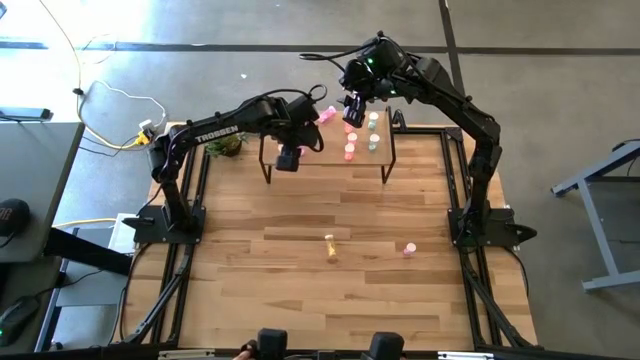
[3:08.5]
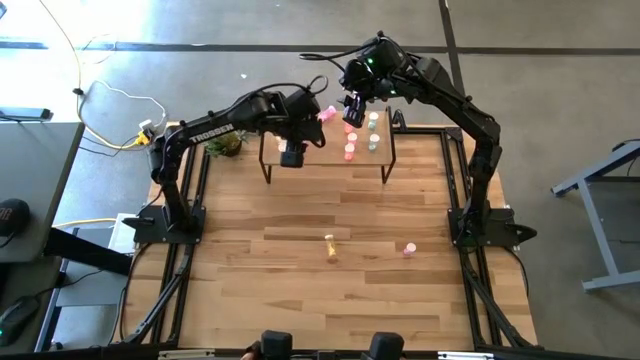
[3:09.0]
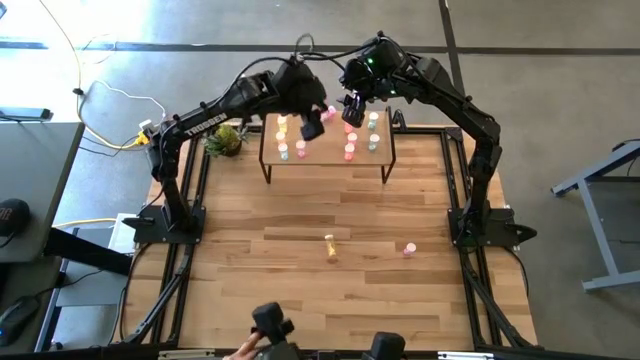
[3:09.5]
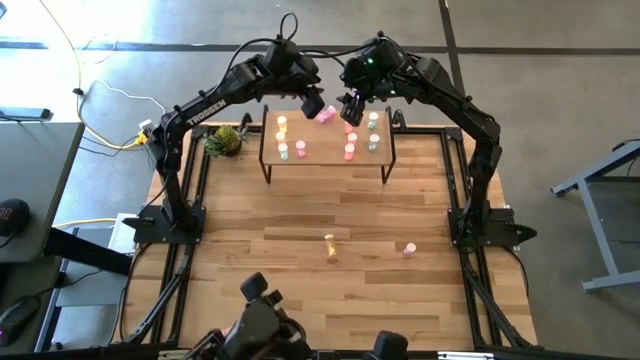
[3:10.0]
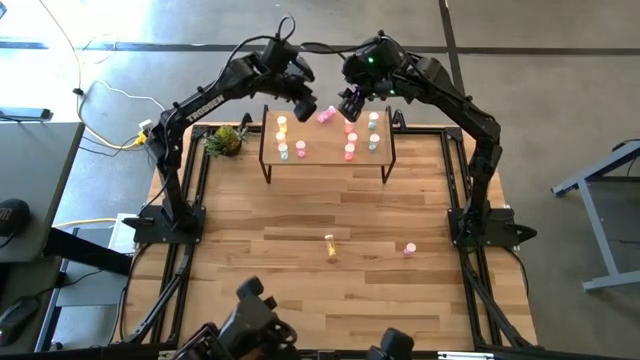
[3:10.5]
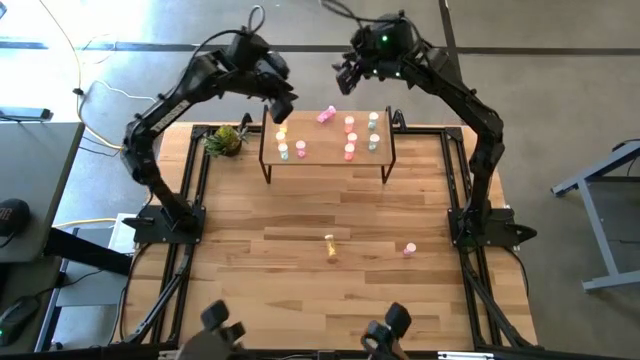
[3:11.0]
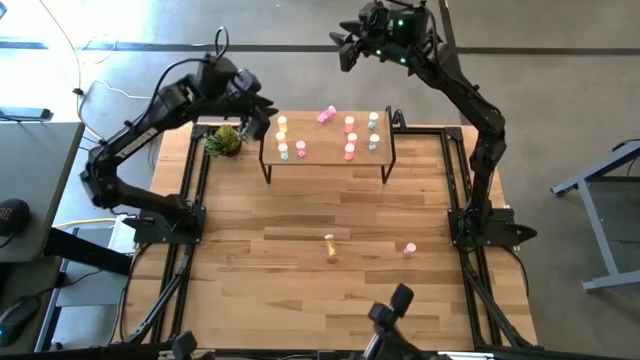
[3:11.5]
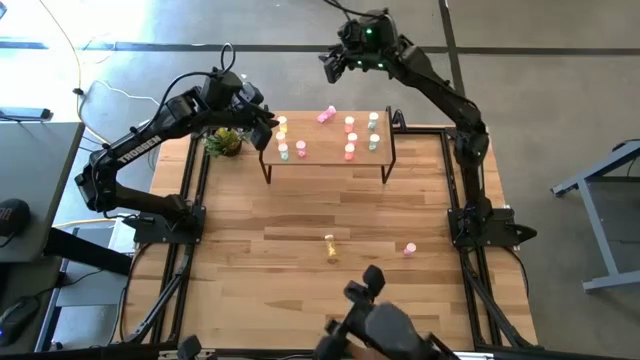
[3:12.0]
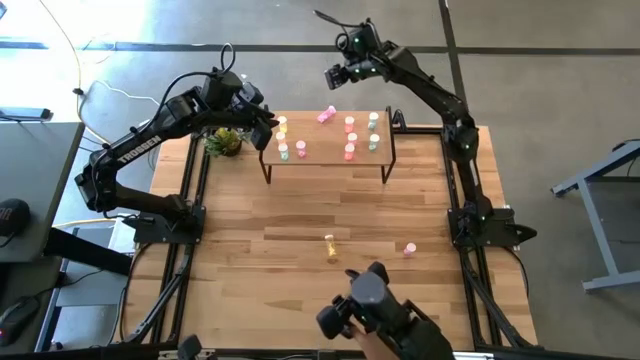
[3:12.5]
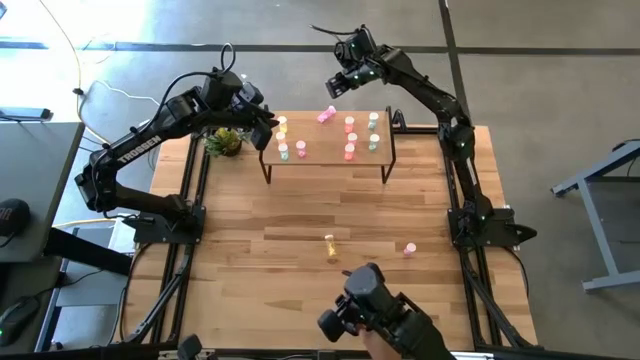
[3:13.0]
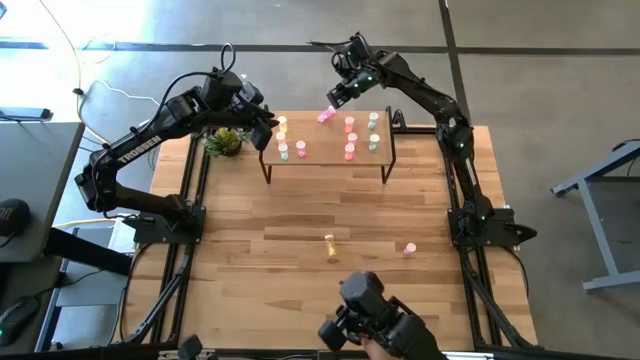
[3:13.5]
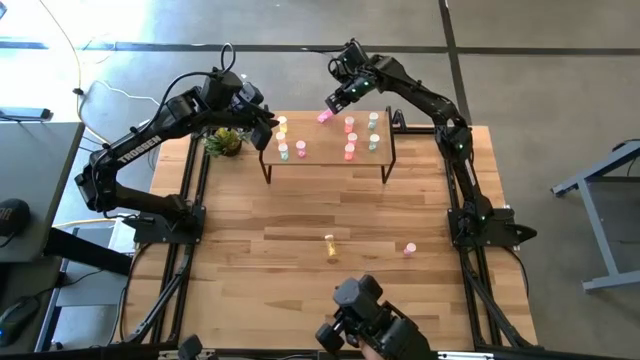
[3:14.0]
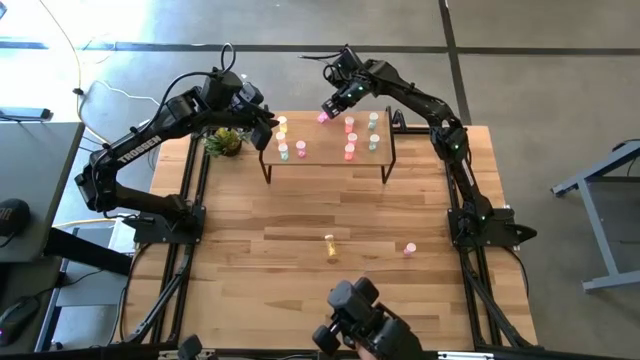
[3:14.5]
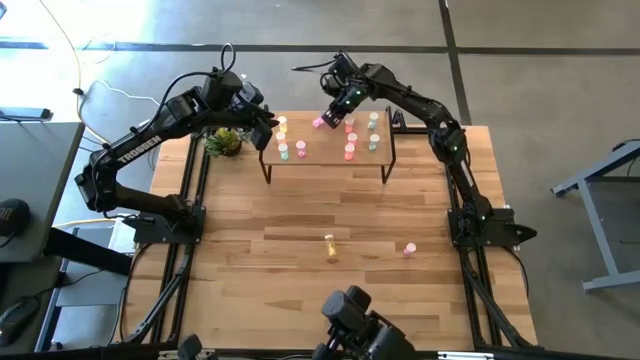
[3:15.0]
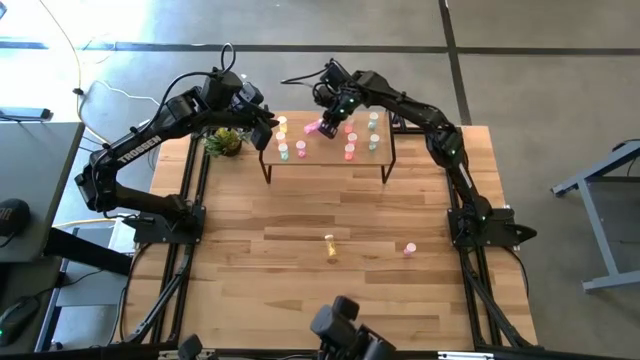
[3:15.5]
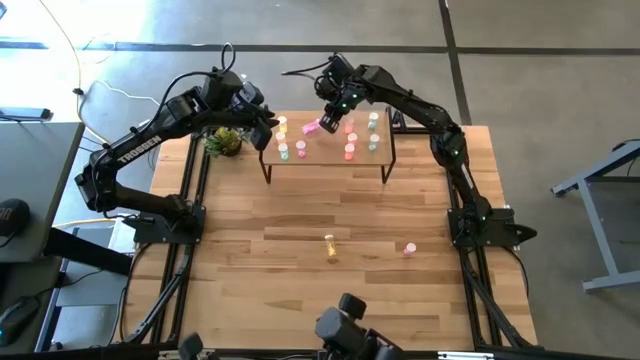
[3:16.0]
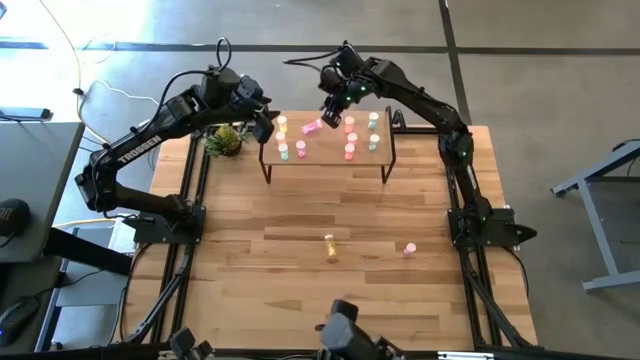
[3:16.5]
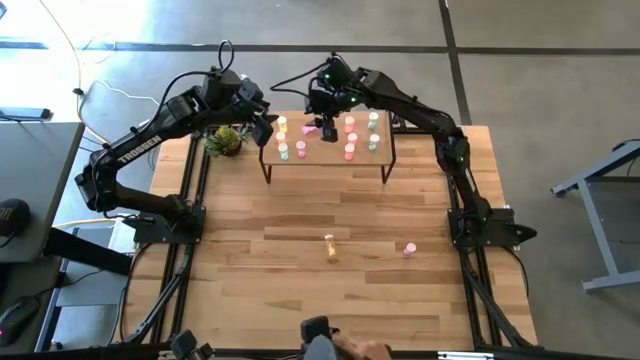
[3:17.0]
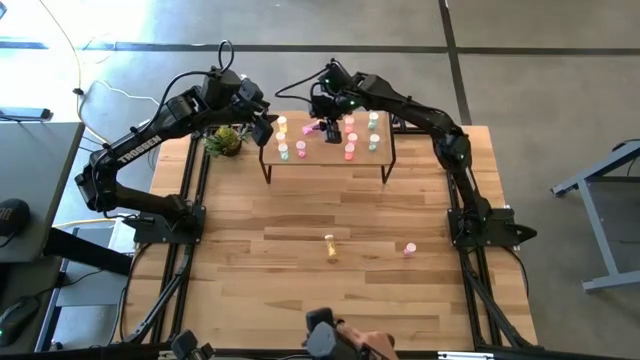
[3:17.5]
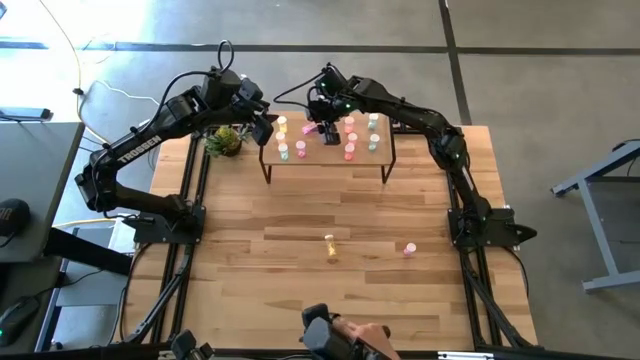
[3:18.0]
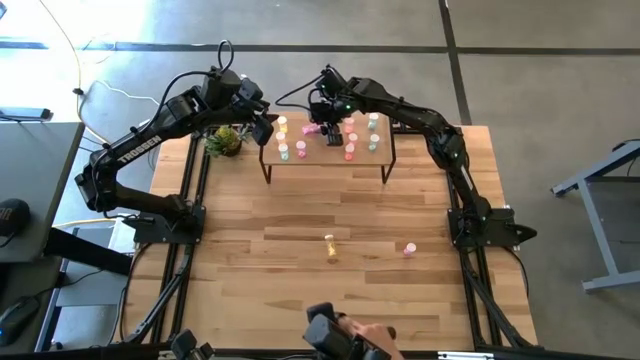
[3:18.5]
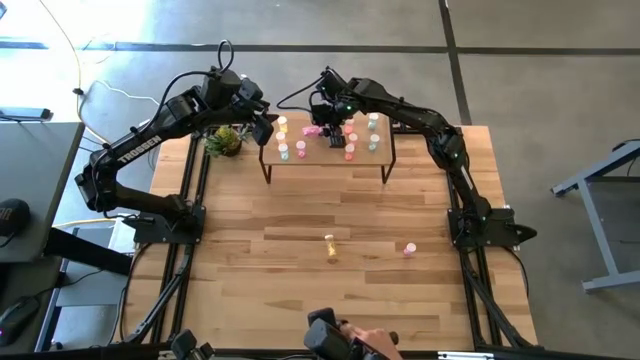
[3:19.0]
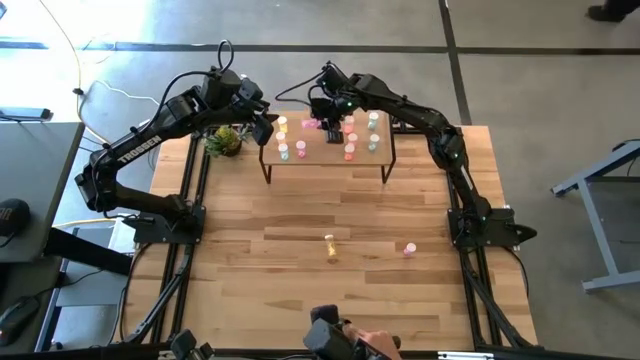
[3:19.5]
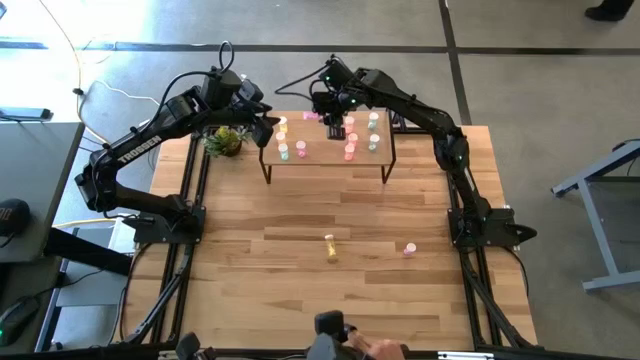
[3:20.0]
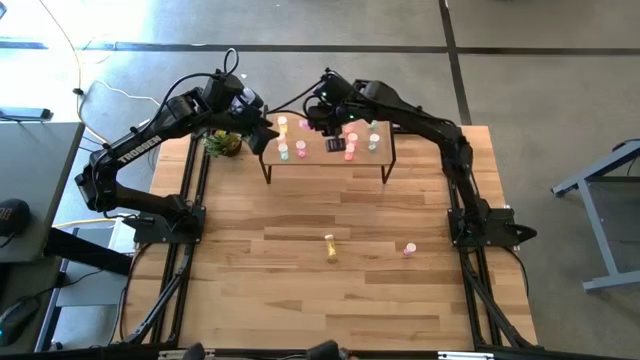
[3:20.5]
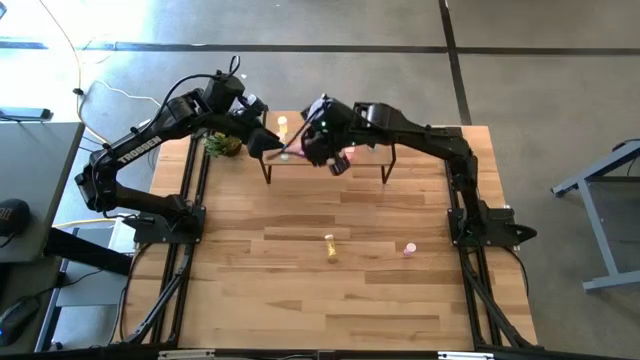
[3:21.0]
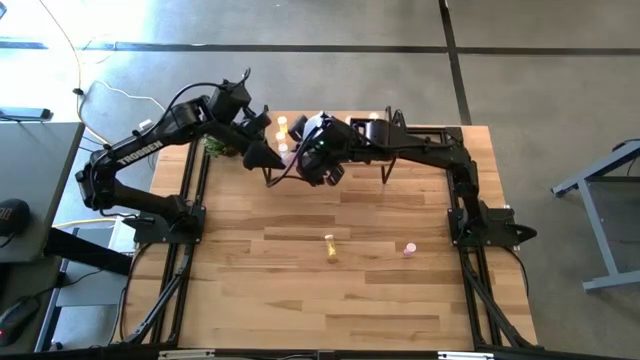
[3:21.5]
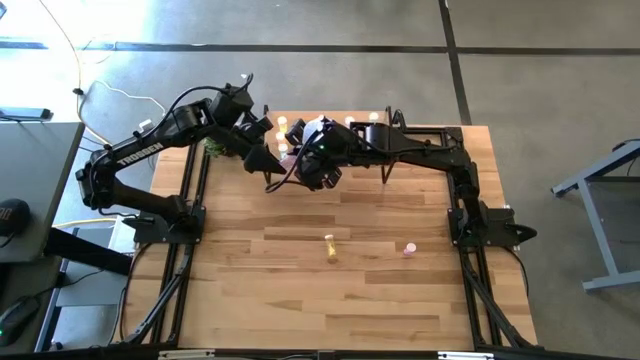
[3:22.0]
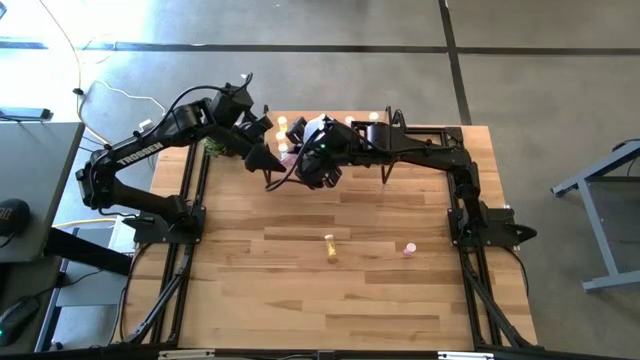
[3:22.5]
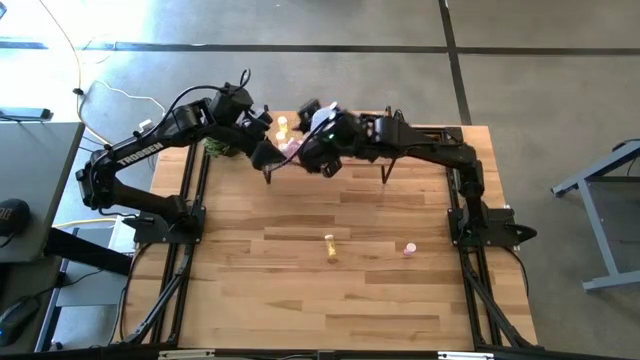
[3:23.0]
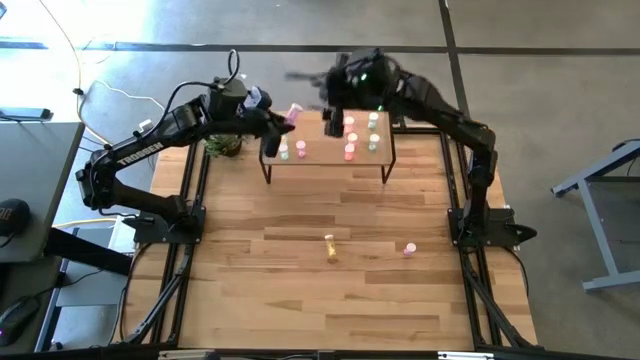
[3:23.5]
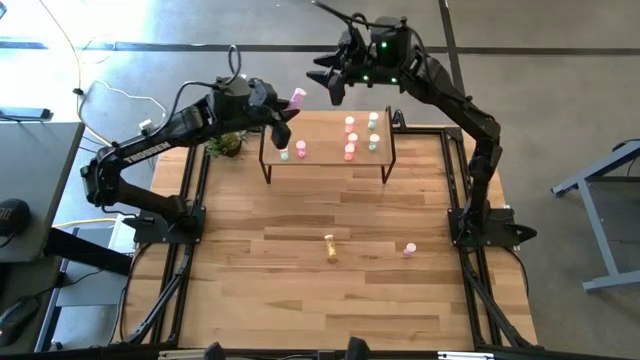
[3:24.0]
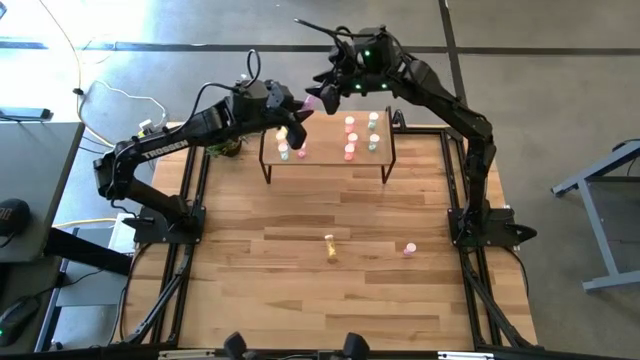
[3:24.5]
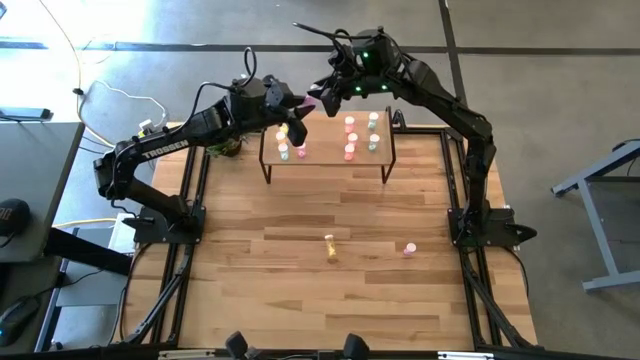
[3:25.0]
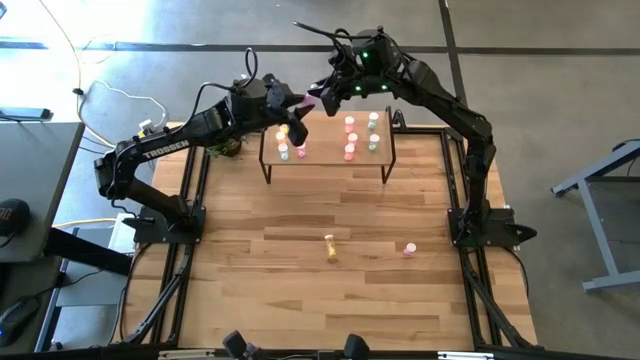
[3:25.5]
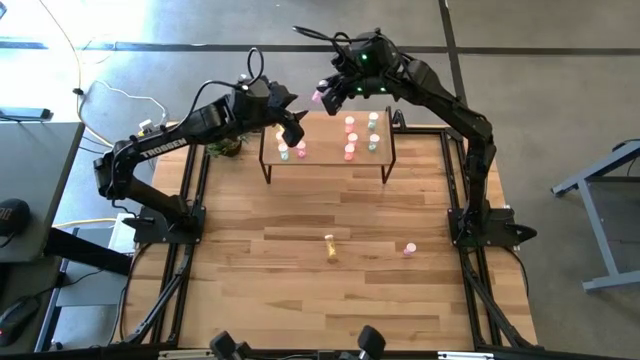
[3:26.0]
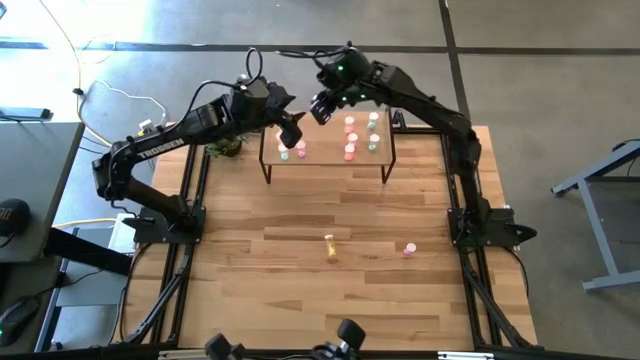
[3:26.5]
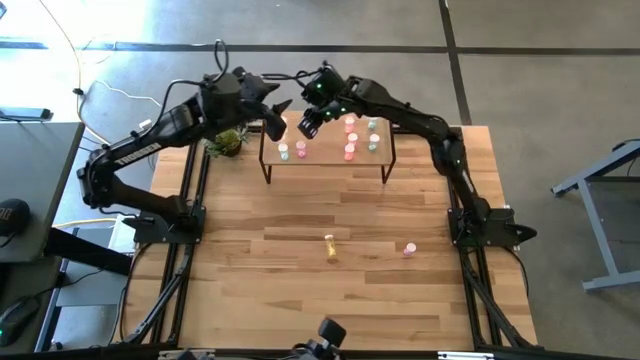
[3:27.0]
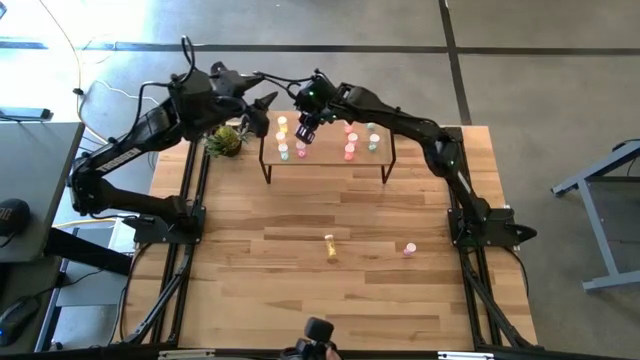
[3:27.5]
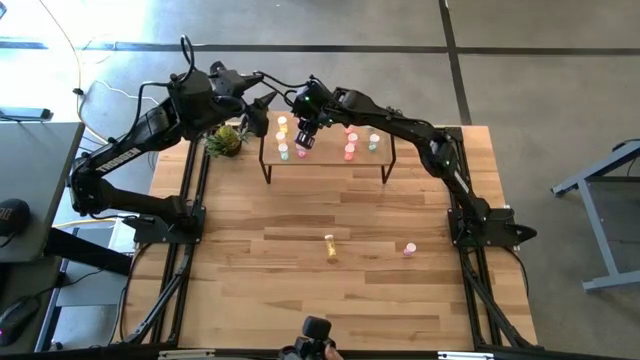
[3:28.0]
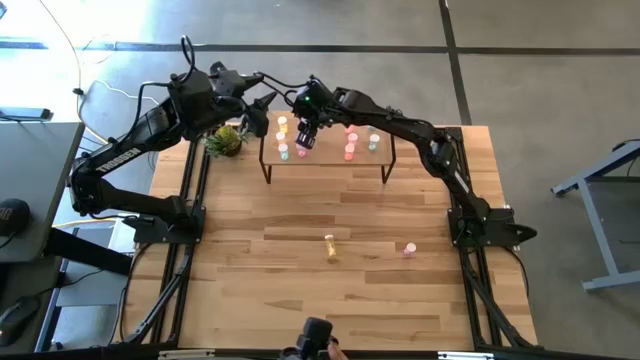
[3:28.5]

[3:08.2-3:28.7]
Task: Pick and place medicine bottles onto shelf by color
Adjust the pink pill bottles on the shelf

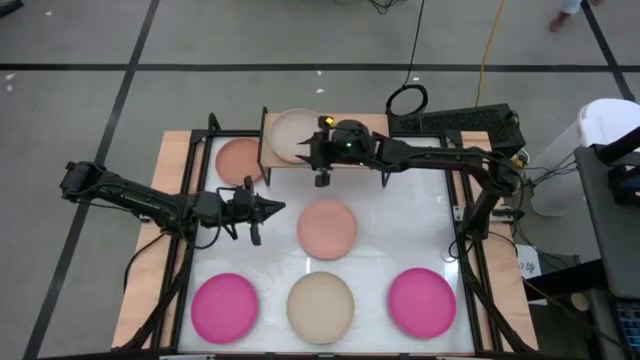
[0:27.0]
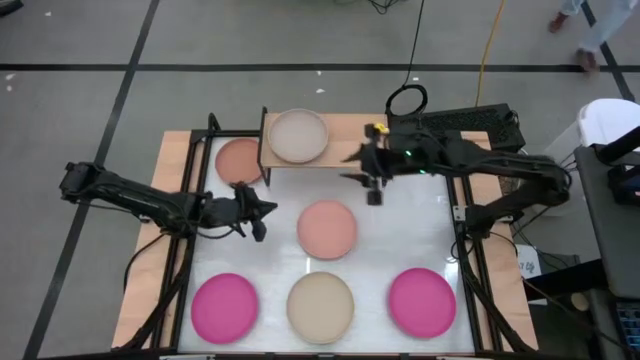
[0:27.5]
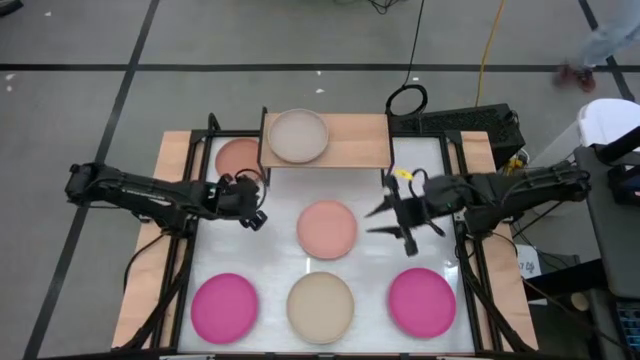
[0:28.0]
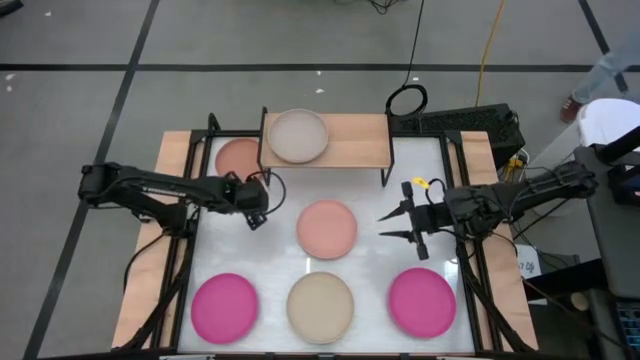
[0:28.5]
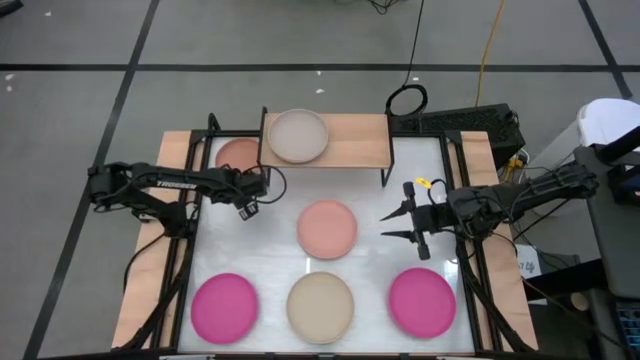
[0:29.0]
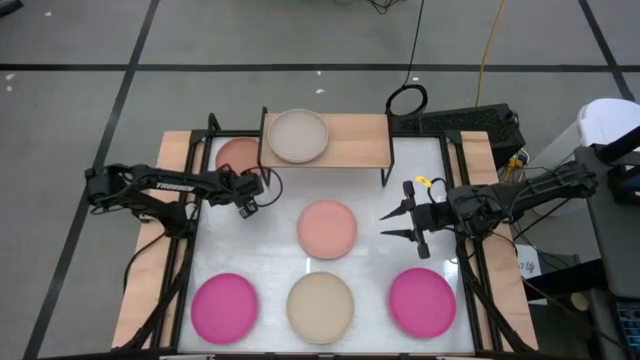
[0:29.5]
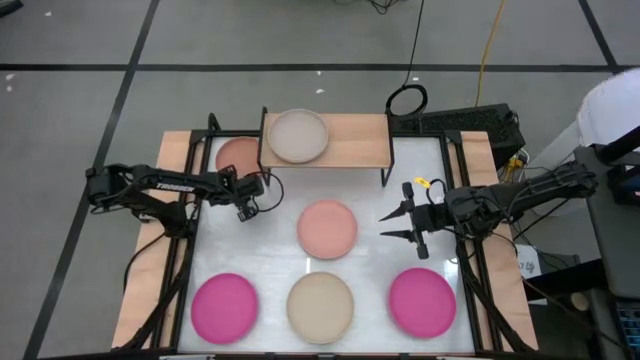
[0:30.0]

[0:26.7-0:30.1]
Task: Place and stack plates onto a shelf
Stack the top right orange plate on top of the brown plate on the shelf
